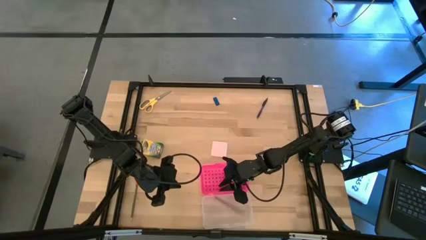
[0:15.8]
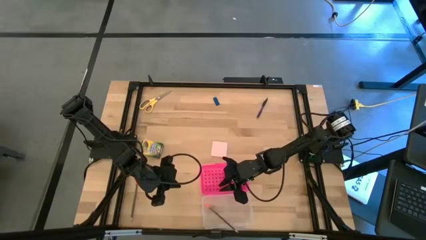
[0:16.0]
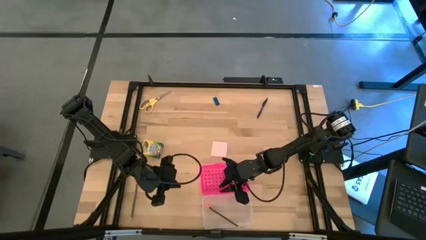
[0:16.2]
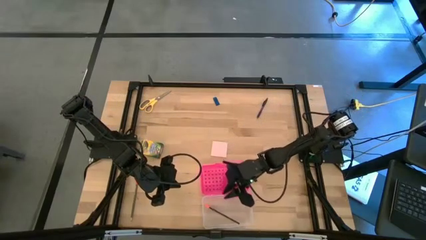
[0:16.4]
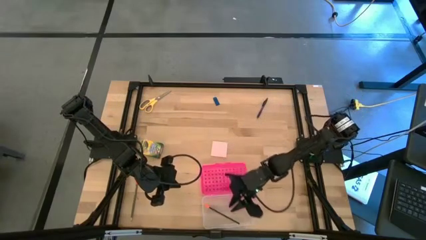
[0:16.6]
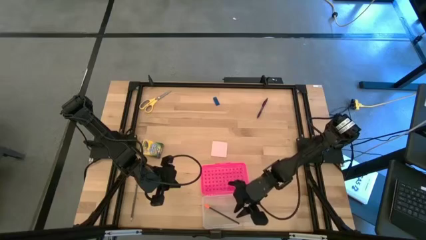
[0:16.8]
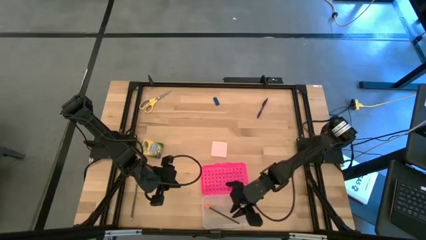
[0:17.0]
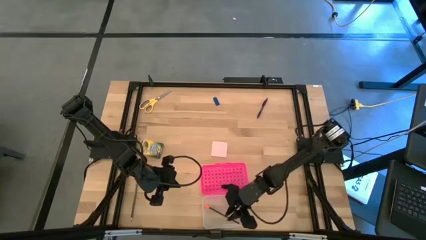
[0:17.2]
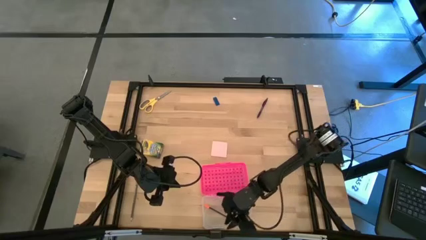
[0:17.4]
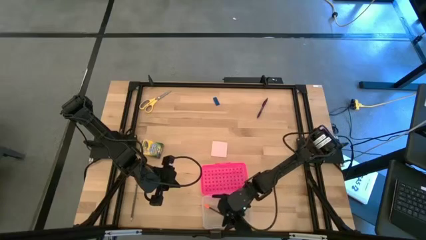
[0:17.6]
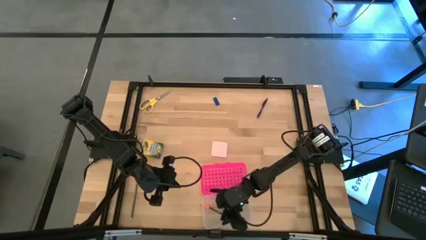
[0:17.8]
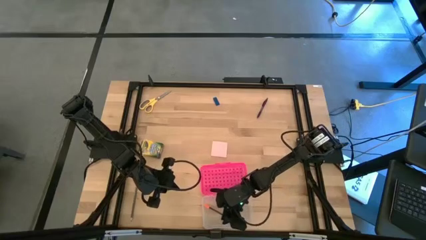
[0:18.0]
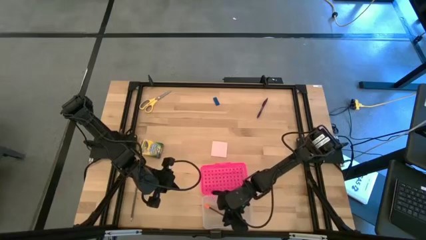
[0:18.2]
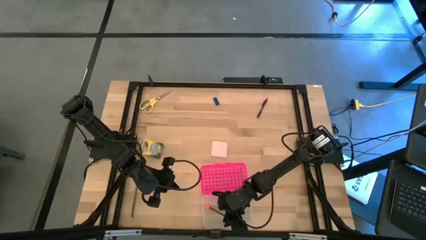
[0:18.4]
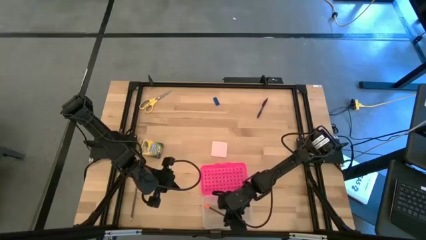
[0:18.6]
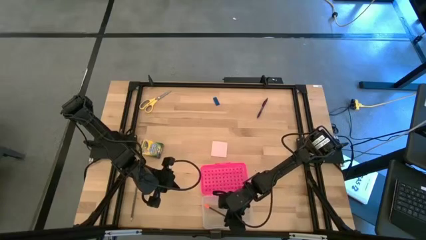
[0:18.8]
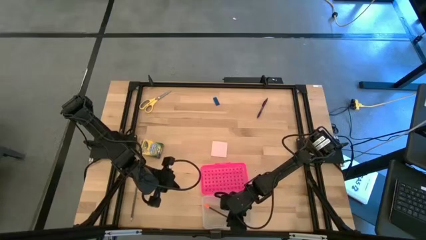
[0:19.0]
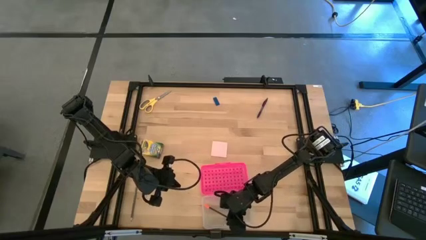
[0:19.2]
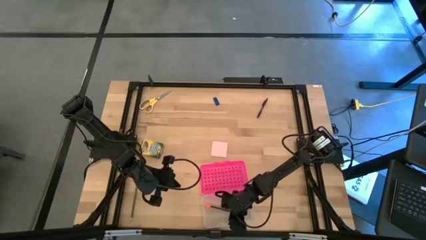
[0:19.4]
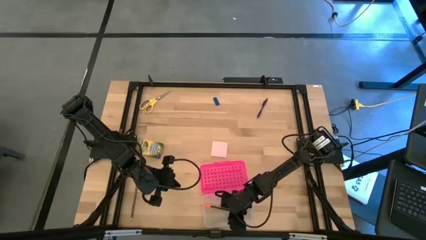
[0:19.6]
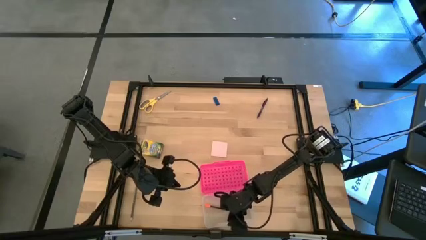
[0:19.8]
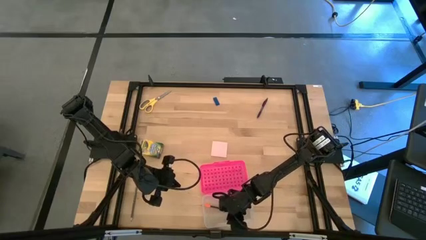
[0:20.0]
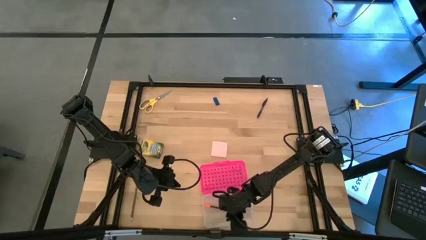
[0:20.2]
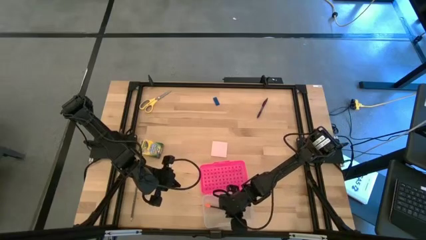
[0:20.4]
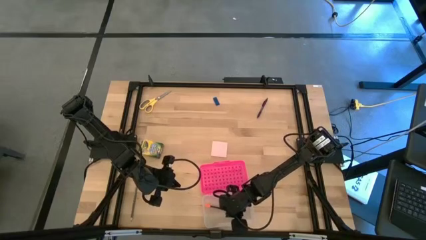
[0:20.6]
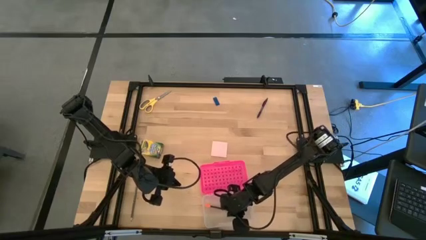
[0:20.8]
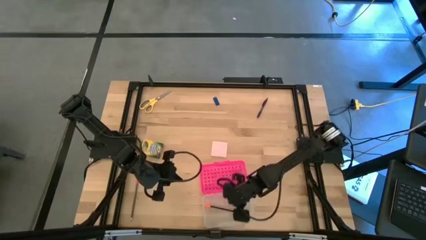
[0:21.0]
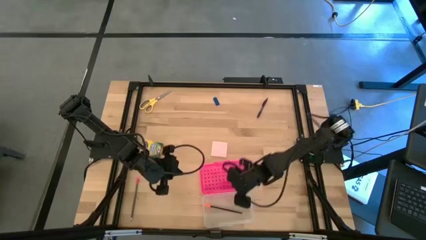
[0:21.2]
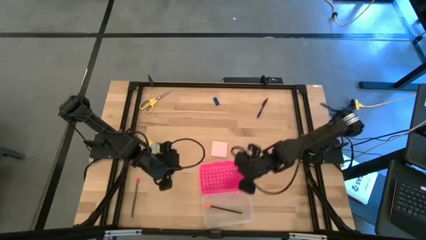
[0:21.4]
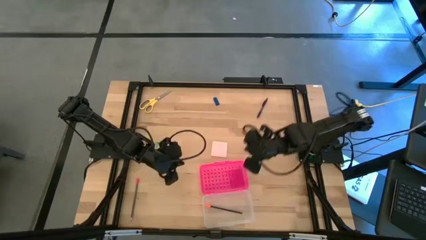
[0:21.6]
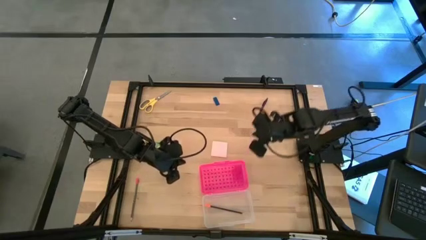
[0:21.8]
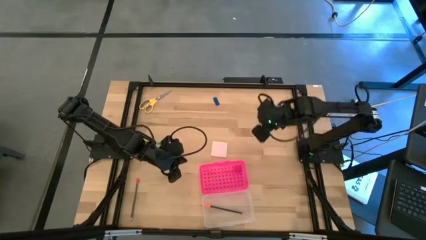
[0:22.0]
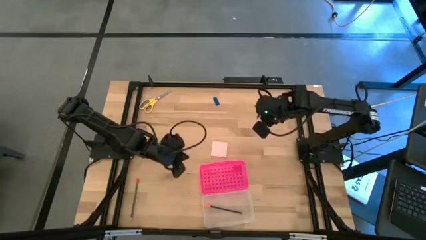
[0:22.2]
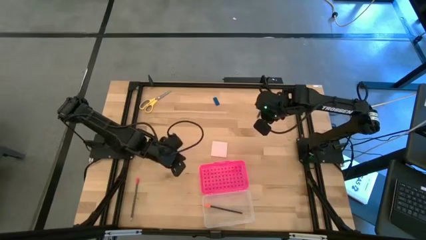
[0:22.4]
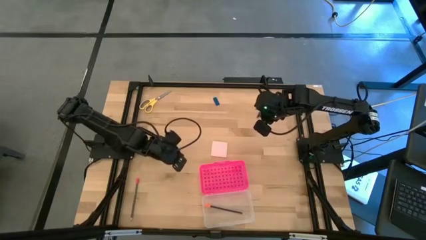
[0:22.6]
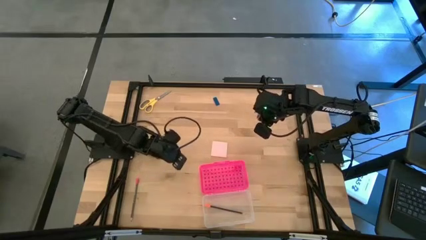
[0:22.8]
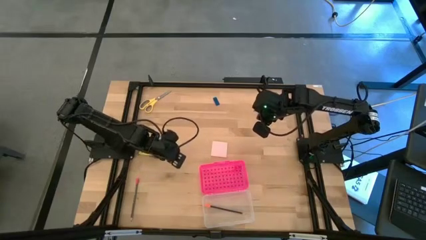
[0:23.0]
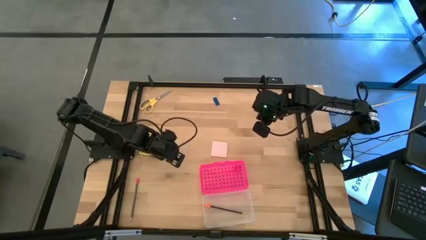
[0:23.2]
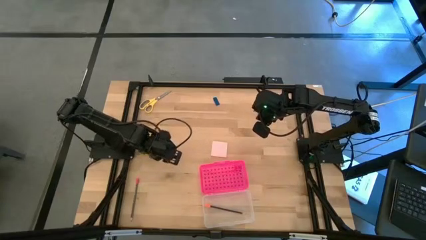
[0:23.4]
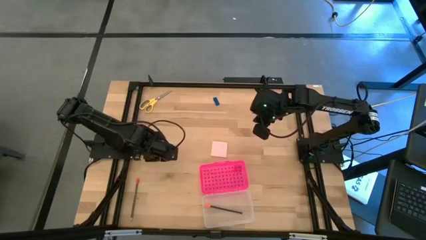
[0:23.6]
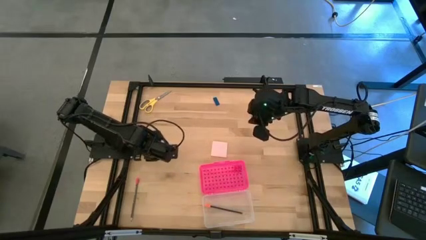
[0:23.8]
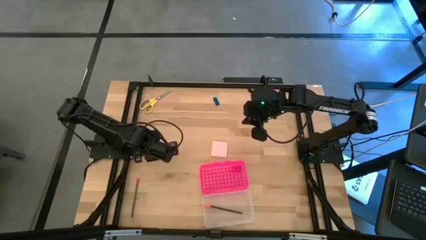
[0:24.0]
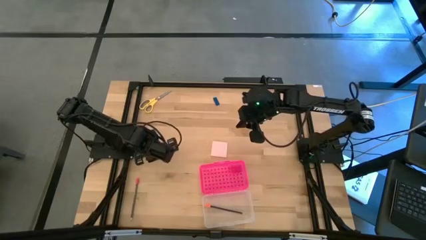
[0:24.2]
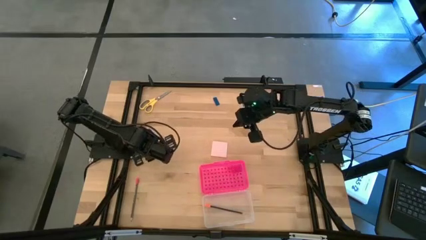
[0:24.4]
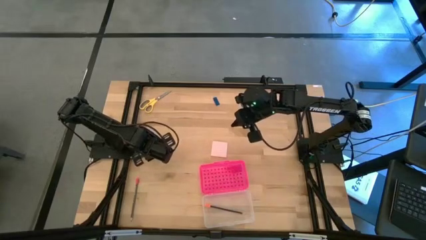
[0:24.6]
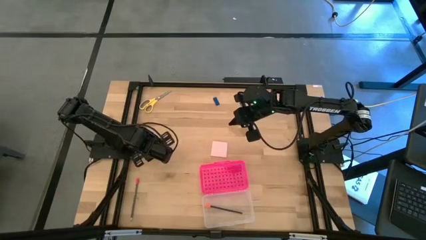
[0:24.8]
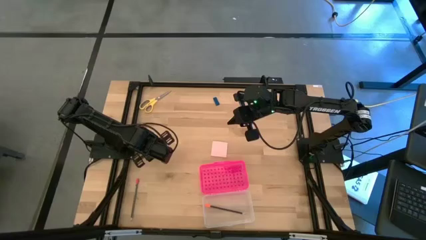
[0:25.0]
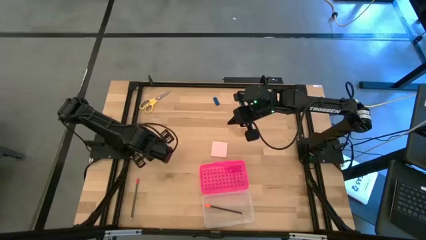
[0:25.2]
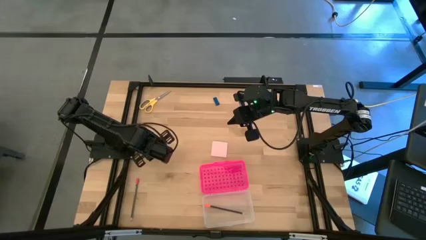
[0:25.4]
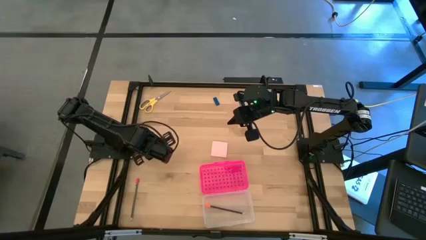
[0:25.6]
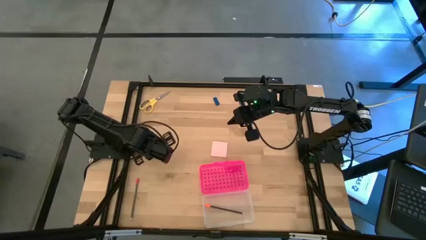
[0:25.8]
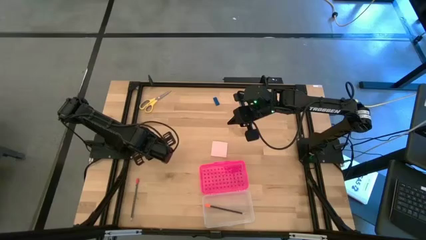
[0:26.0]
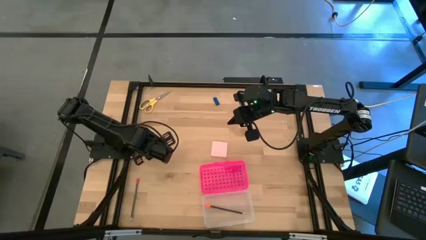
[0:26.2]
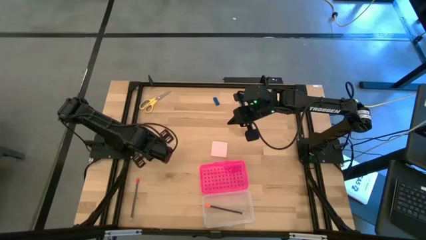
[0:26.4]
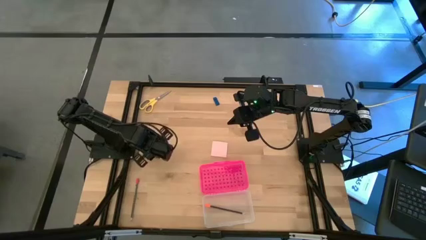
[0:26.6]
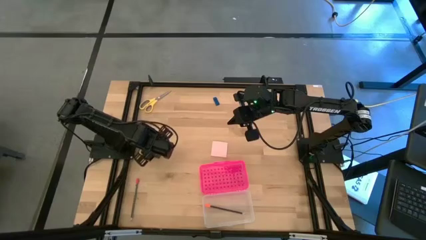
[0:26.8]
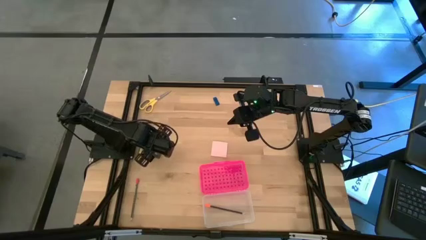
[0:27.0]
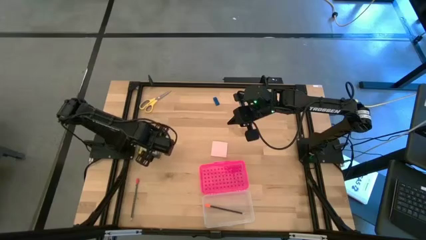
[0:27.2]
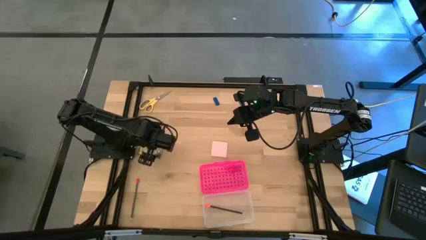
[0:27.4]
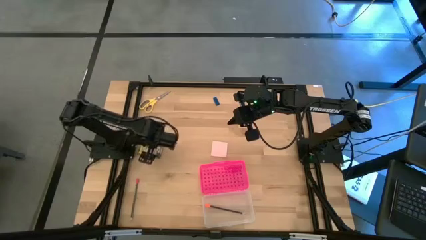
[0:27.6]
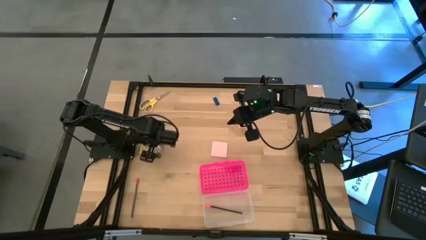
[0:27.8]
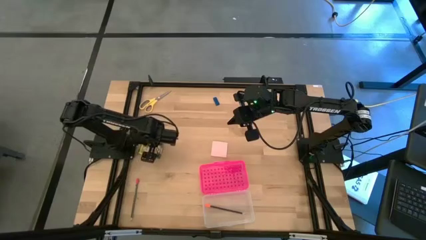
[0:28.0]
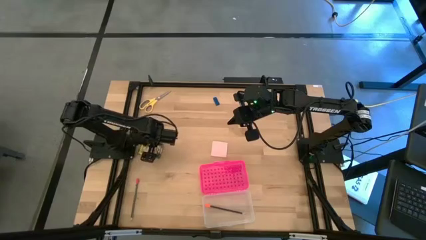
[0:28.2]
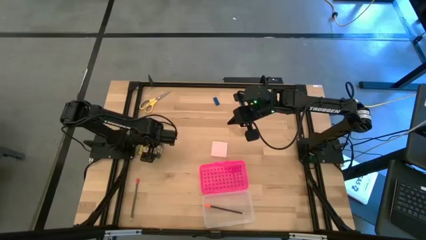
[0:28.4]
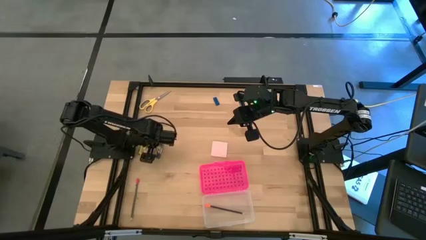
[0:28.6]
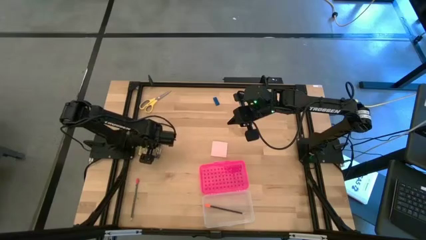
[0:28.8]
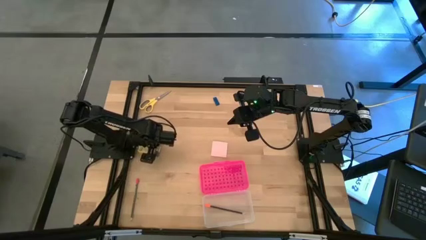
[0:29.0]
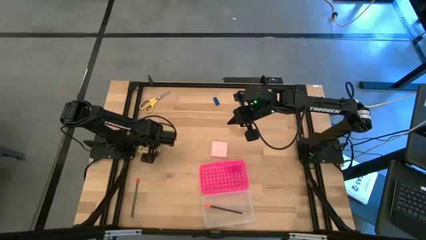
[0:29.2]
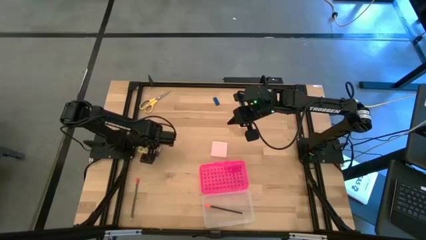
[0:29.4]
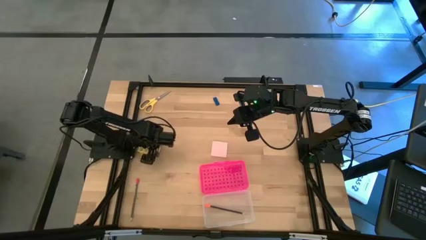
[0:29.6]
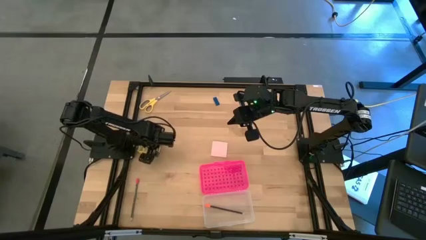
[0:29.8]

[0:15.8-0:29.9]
Task: Pack school essentials
Put the yellow crayon box into the pink supply box
